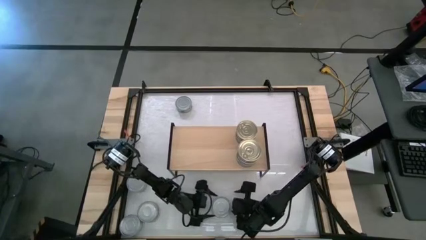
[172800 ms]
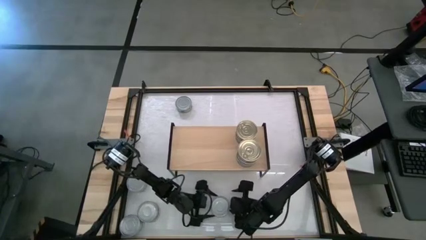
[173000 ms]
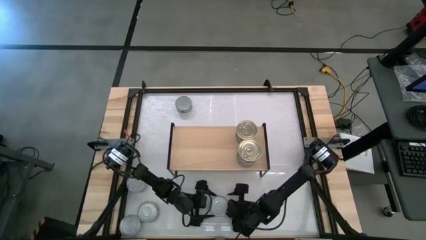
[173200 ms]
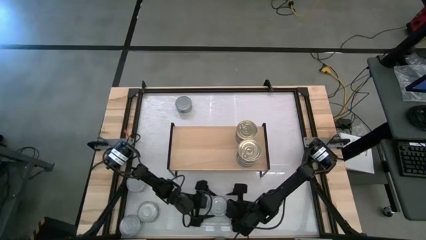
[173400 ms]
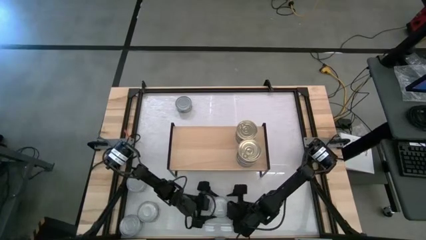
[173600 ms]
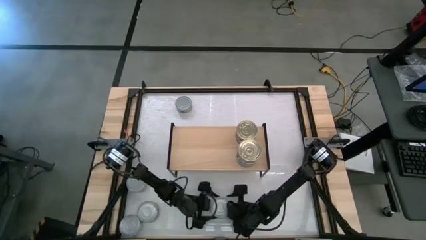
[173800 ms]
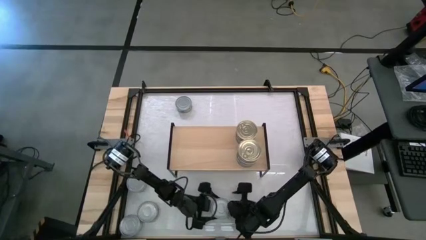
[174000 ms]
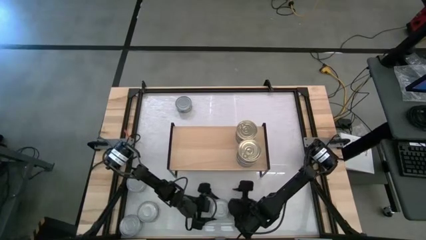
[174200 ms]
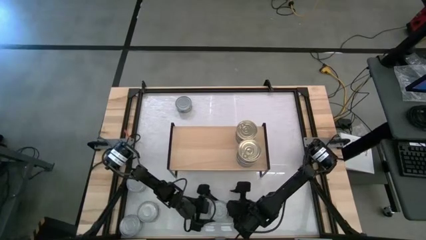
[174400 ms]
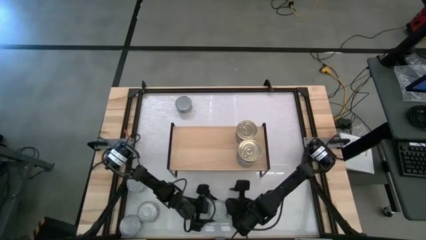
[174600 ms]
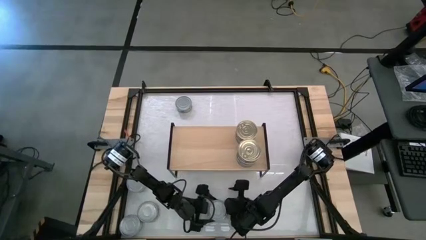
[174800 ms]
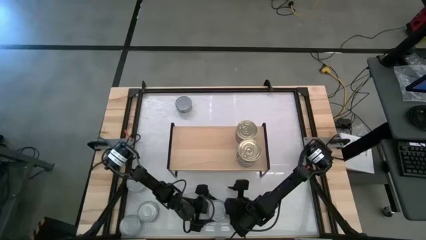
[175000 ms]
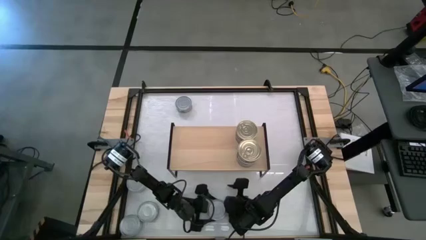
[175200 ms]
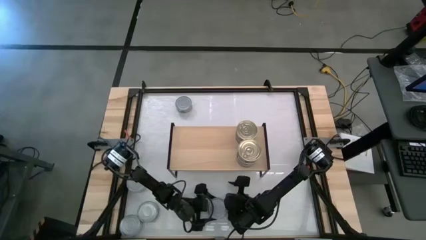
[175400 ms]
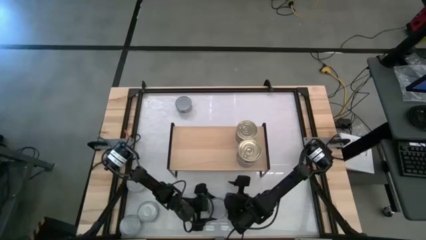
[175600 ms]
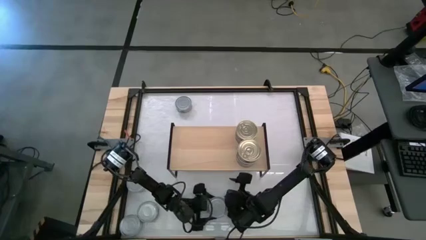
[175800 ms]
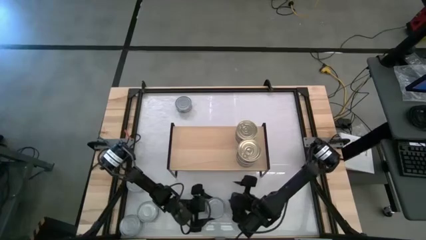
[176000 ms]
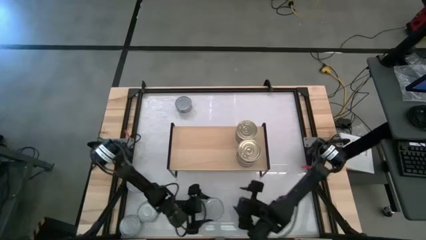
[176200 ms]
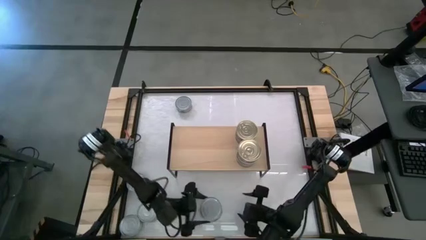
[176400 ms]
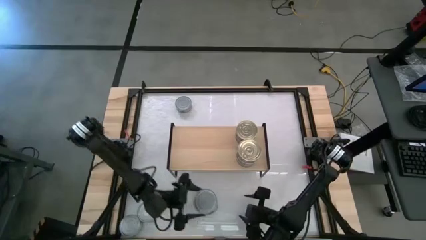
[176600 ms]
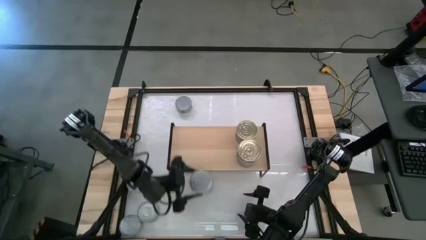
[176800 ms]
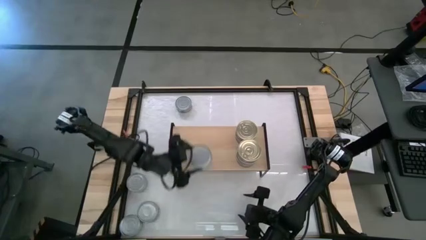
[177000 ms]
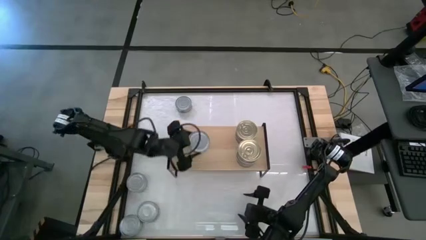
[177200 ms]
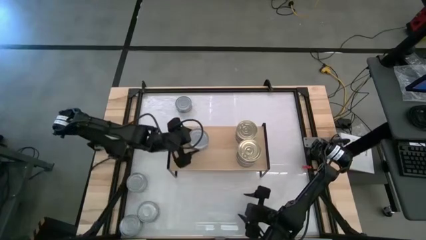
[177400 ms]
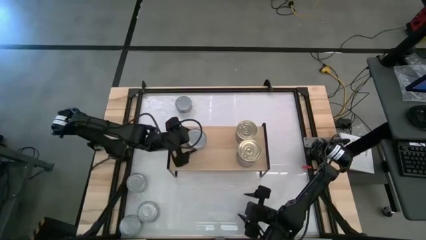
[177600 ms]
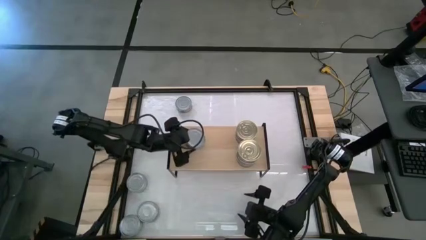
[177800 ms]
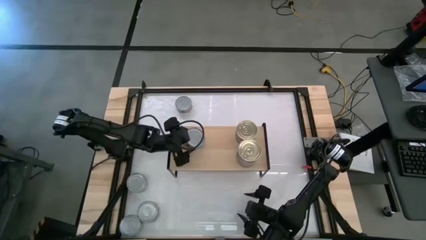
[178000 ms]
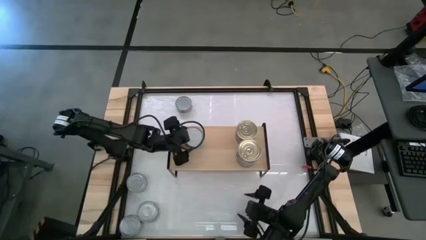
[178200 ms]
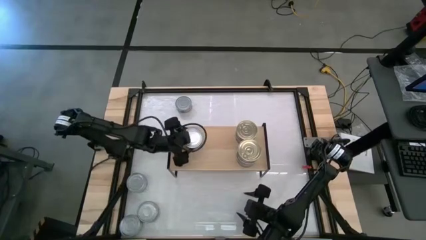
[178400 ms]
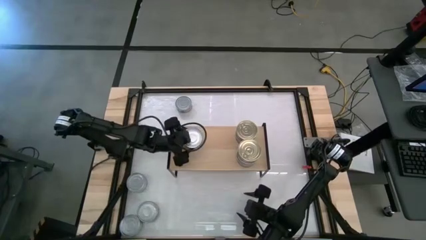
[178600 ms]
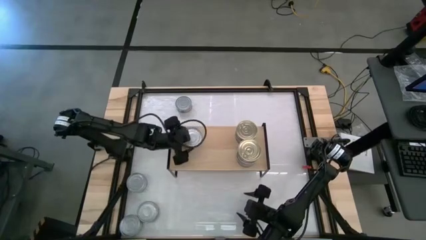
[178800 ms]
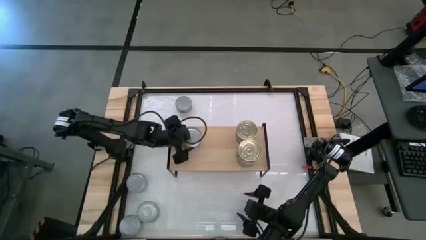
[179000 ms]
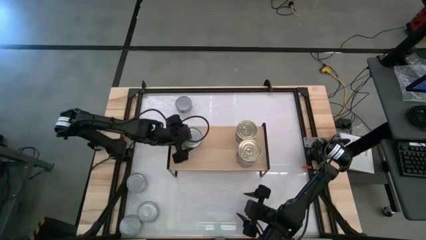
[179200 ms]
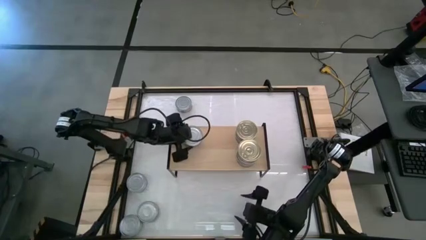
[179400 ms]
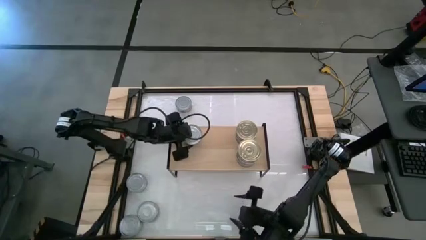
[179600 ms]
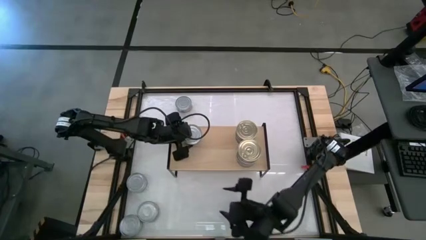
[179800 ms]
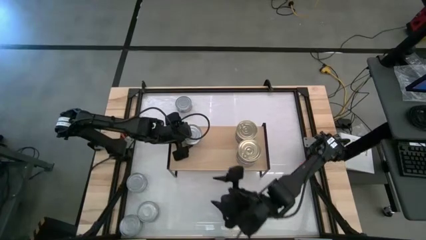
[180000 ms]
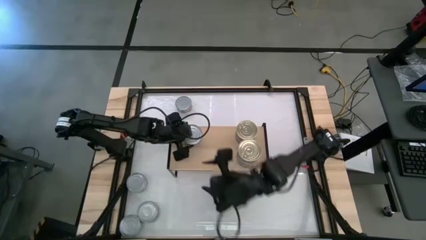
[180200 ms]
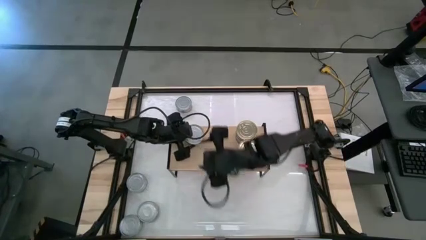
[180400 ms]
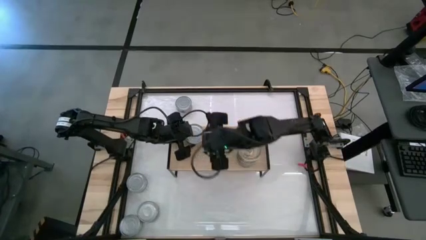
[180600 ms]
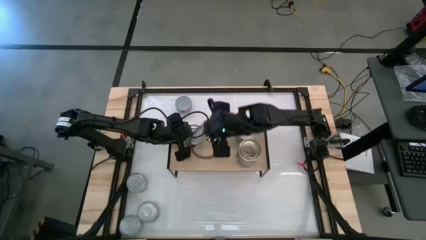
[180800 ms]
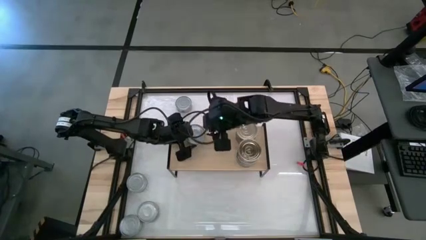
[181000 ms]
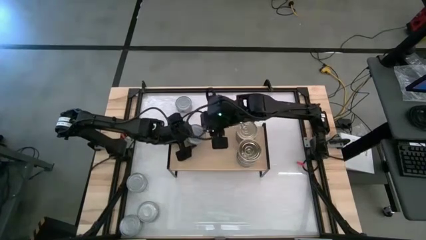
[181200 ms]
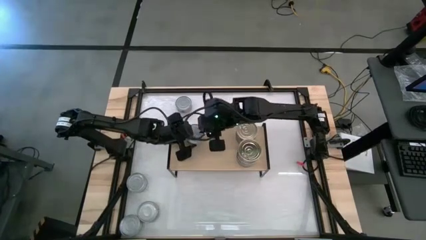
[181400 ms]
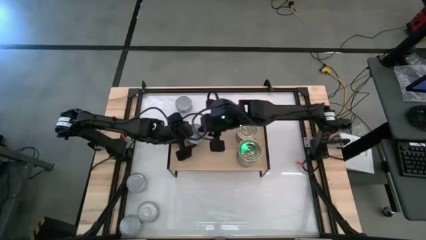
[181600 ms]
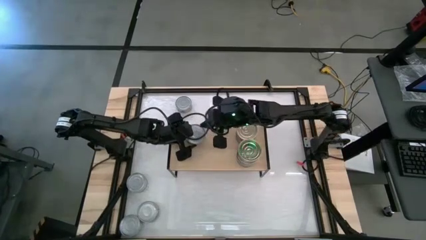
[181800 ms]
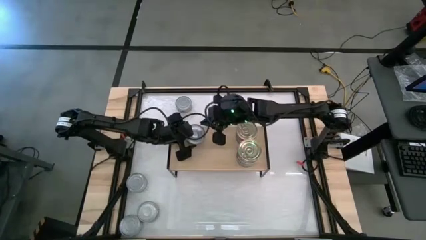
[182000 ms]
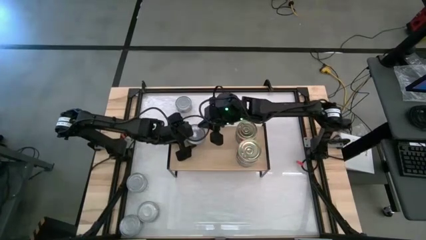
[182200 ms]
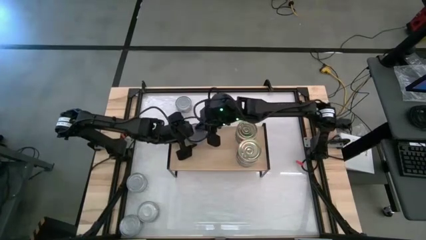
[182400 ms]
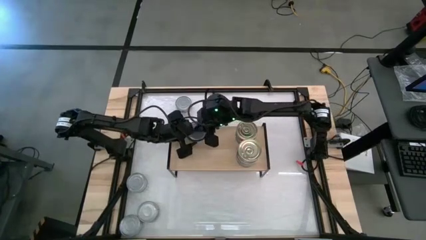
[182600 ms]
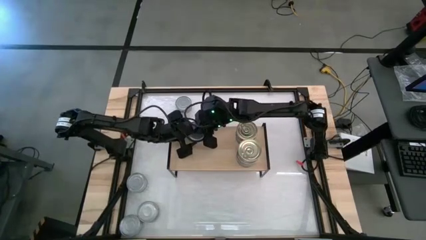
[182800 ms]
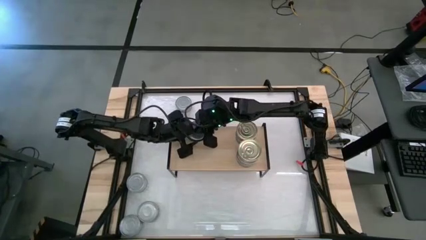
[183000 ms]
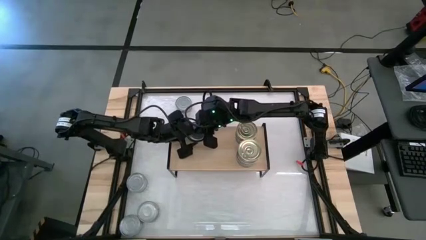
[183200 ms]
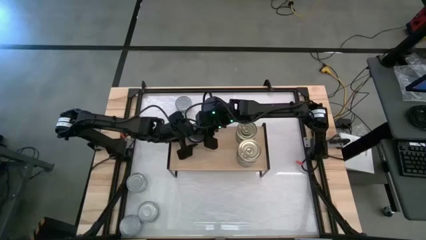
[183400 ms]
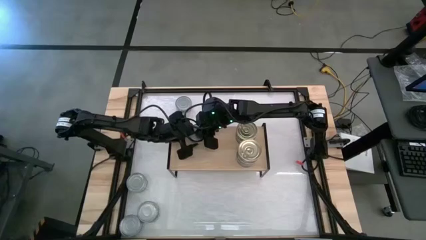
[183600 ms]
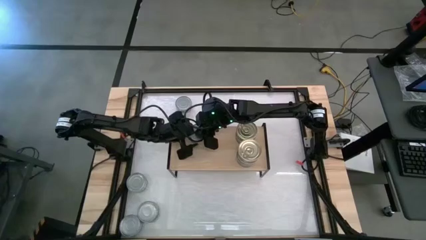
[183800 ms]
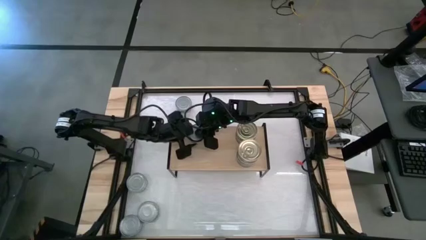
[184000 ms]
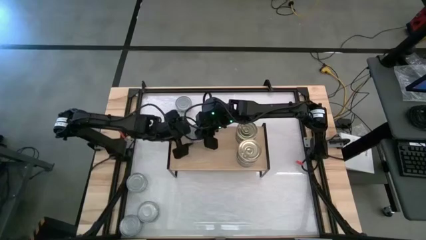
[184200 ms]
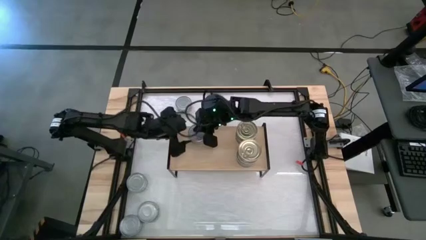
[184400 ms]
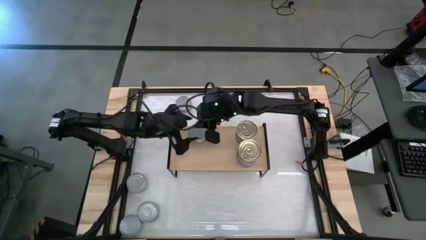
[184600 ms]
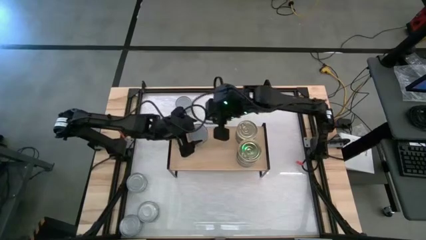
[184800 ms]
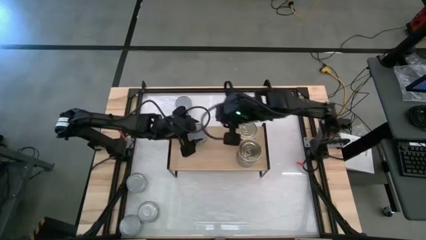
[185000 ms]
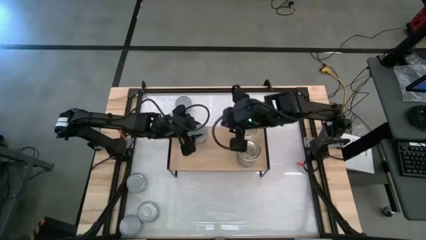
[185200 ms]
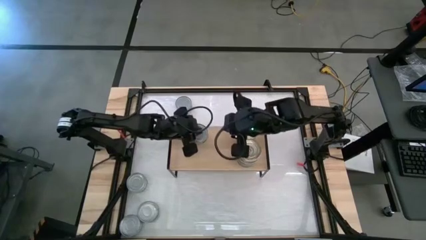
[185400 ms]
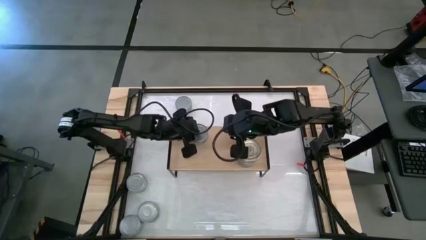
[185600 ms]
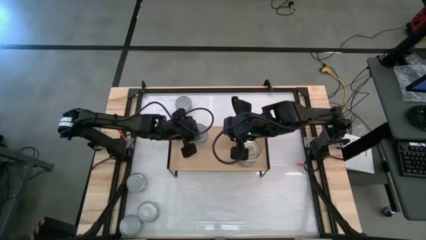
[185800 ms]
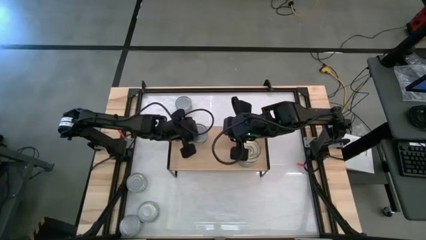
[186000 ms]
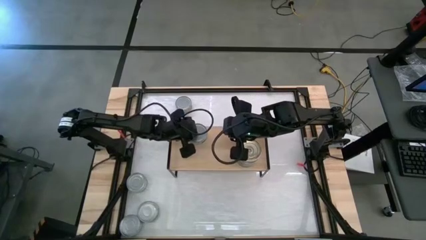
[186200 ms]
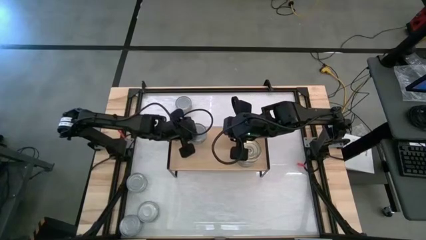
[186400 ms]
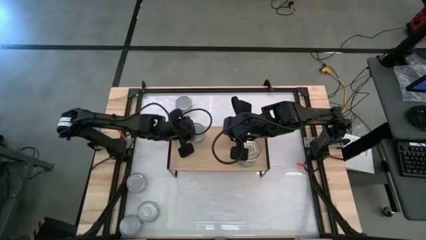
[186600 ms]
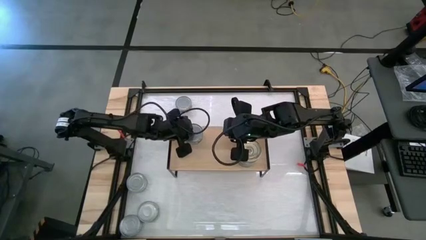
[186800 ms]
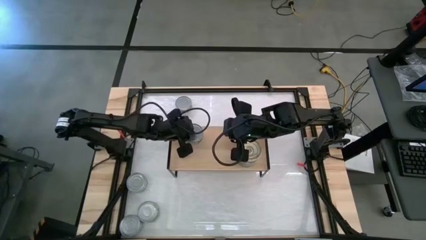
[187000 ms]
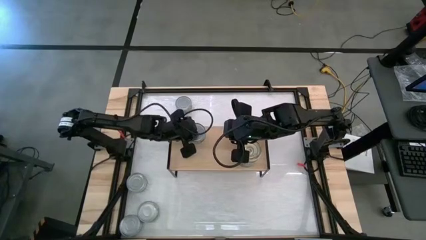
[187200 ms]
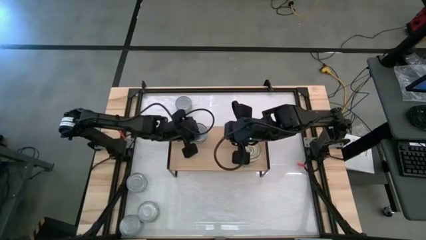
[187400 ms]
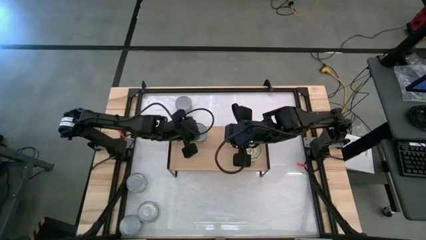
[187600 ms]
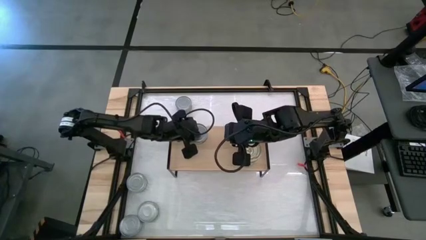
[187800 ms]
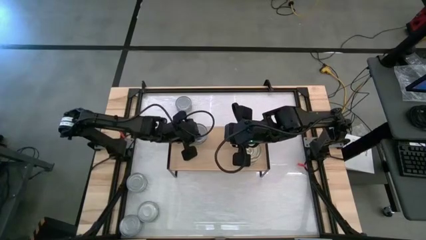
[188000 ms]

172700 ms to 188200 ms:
Task: Stack canned seafood by type on shelf
Put the green tuna can on the shelf
